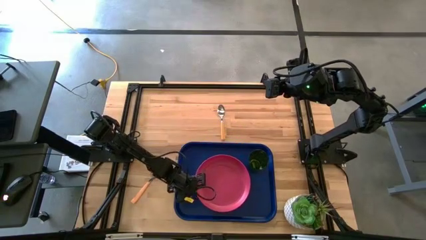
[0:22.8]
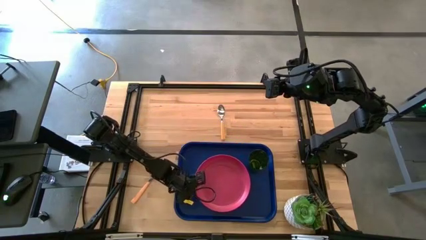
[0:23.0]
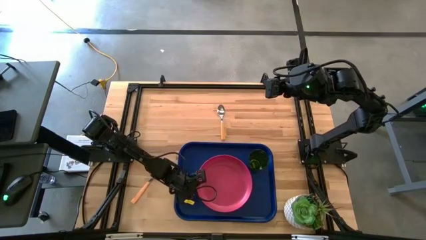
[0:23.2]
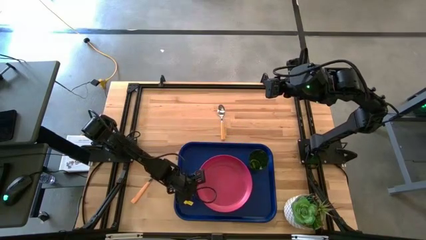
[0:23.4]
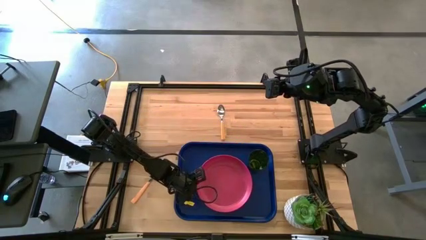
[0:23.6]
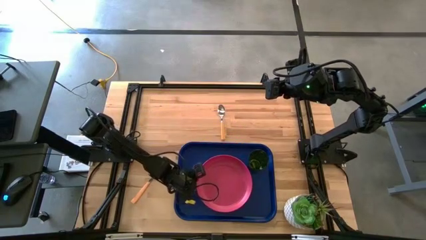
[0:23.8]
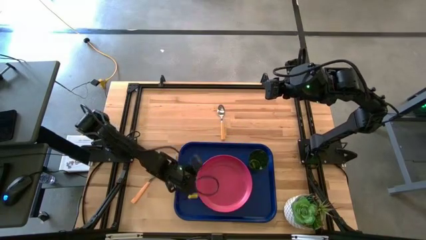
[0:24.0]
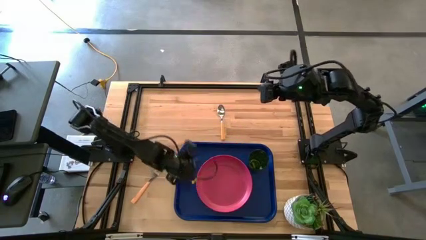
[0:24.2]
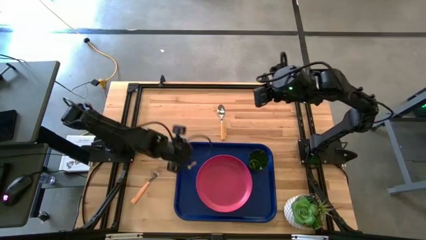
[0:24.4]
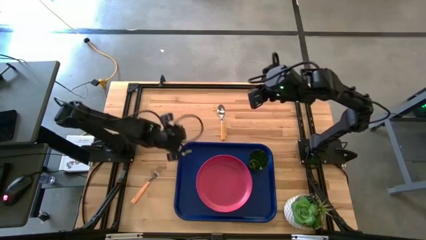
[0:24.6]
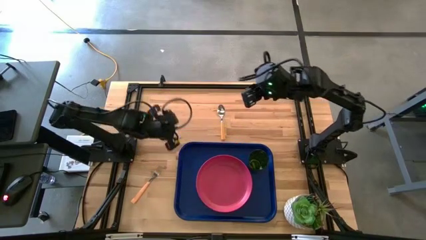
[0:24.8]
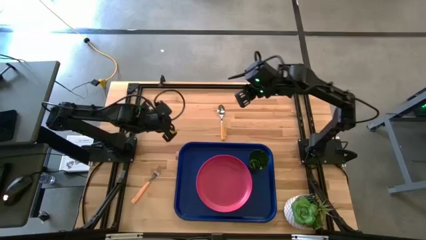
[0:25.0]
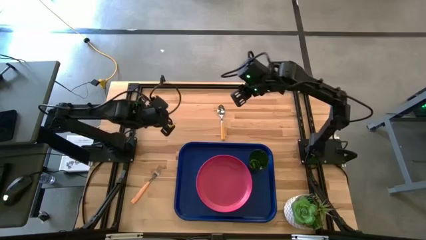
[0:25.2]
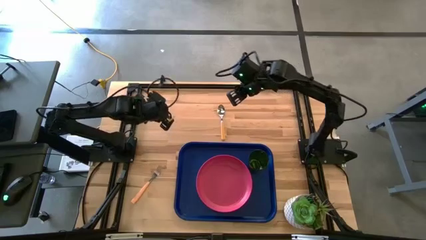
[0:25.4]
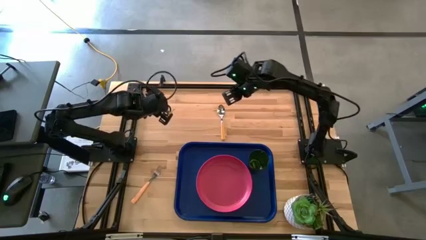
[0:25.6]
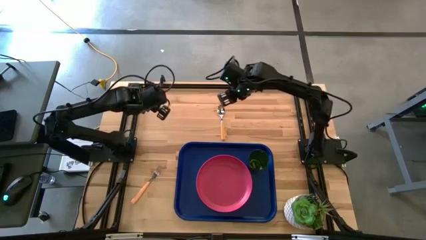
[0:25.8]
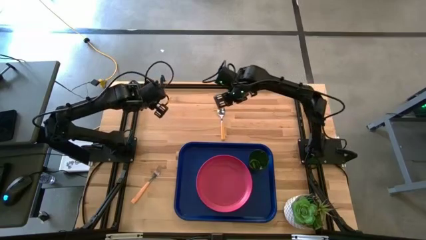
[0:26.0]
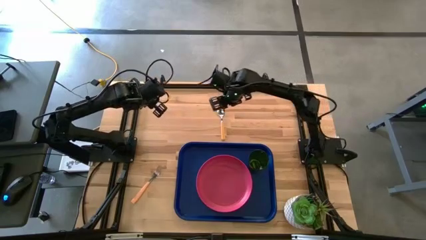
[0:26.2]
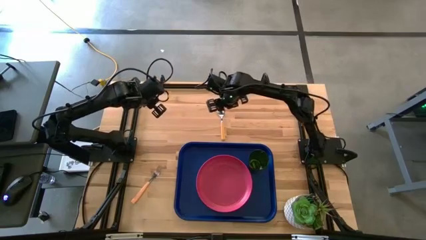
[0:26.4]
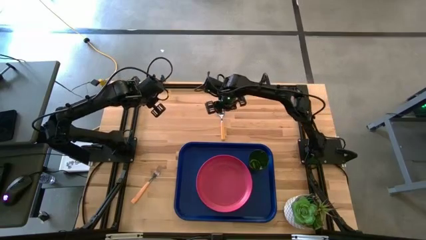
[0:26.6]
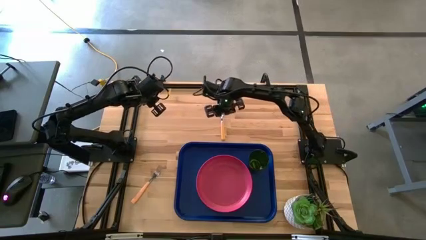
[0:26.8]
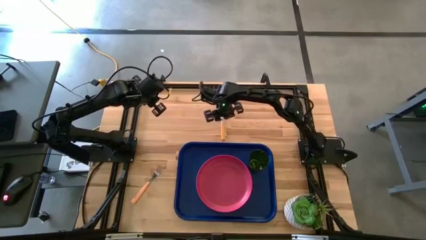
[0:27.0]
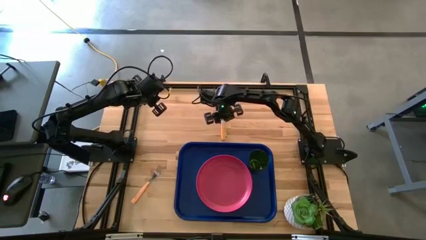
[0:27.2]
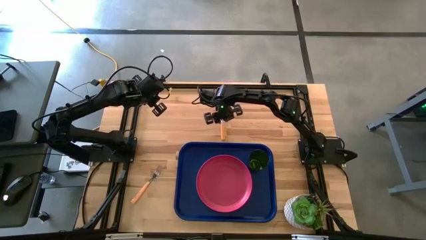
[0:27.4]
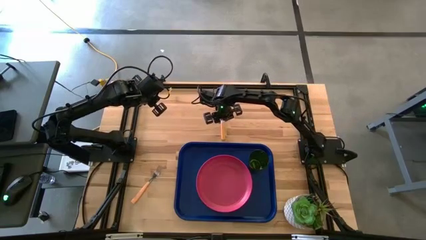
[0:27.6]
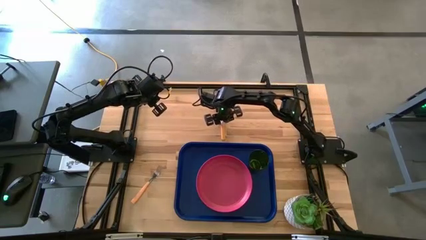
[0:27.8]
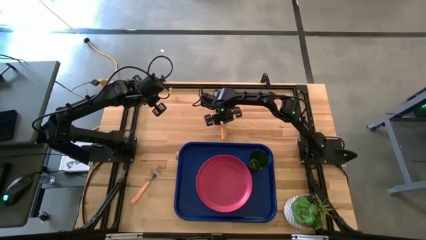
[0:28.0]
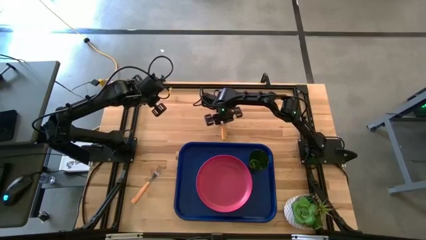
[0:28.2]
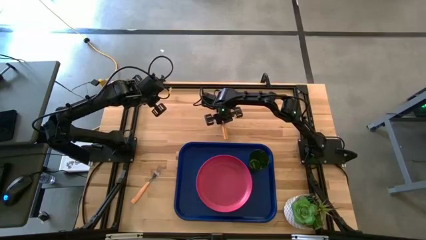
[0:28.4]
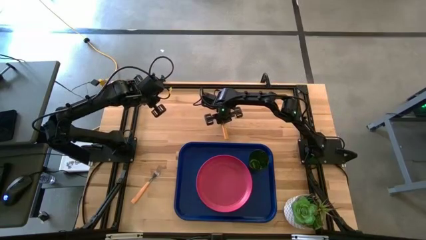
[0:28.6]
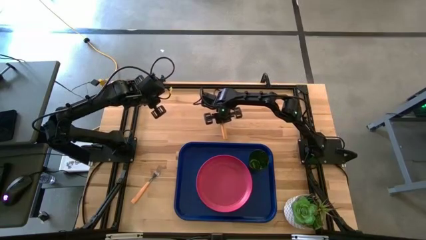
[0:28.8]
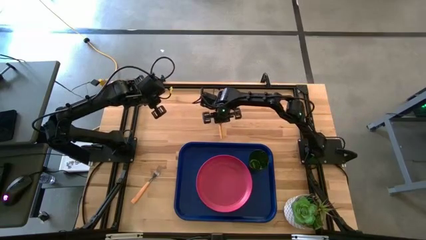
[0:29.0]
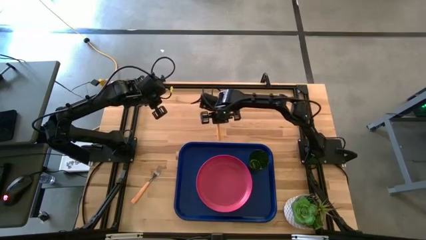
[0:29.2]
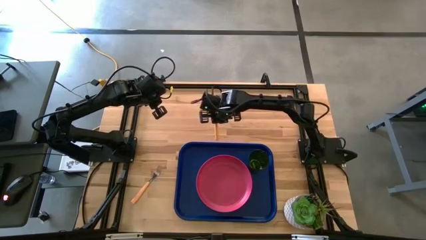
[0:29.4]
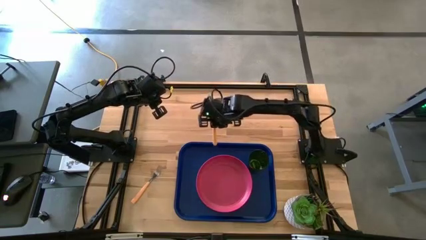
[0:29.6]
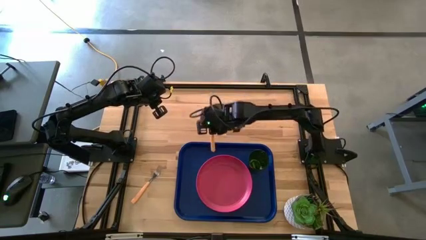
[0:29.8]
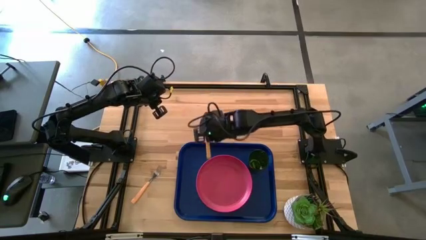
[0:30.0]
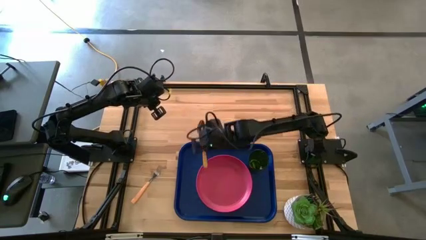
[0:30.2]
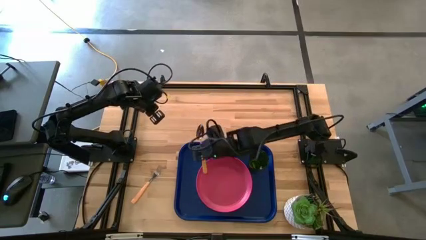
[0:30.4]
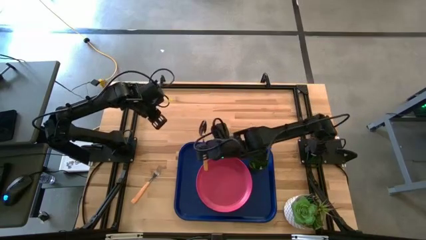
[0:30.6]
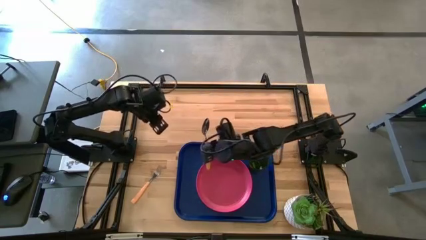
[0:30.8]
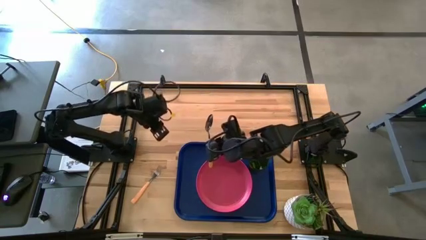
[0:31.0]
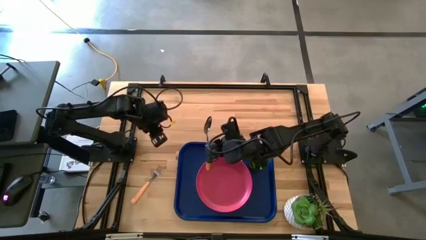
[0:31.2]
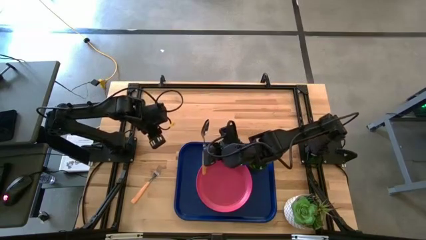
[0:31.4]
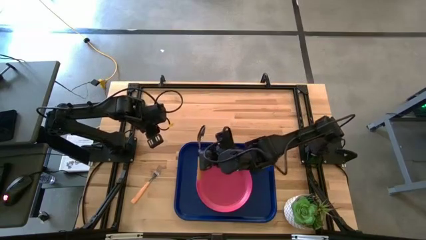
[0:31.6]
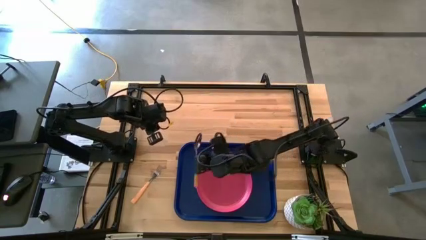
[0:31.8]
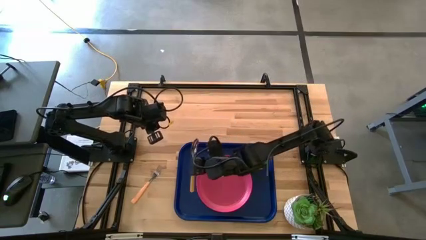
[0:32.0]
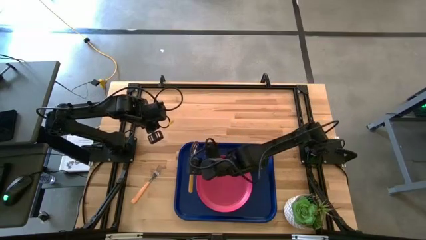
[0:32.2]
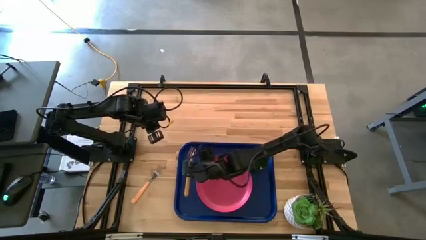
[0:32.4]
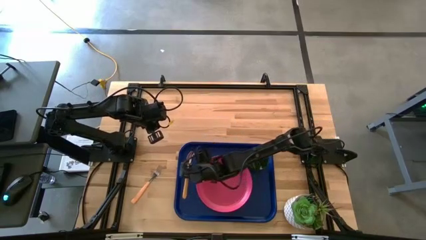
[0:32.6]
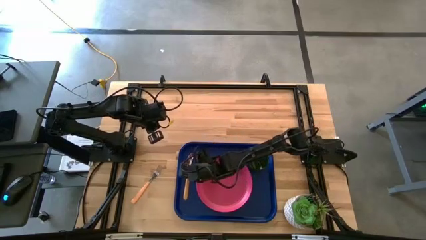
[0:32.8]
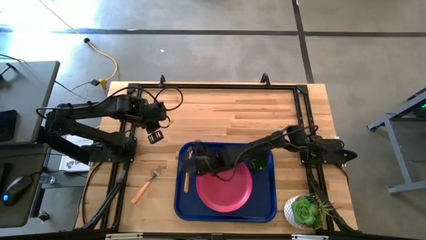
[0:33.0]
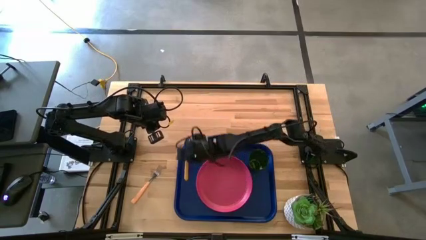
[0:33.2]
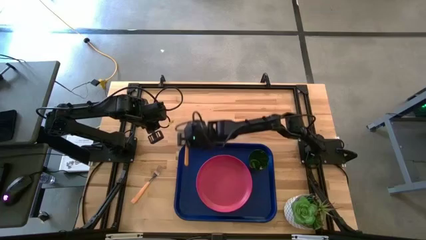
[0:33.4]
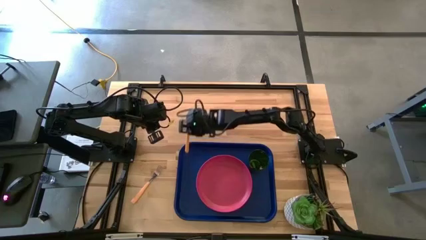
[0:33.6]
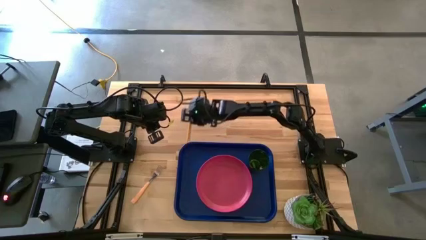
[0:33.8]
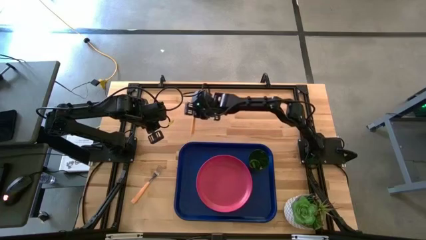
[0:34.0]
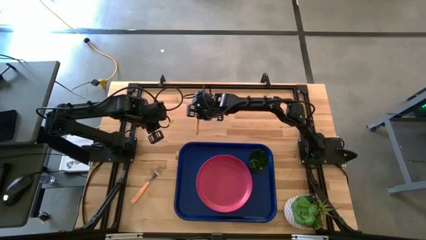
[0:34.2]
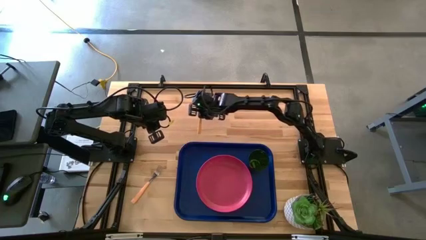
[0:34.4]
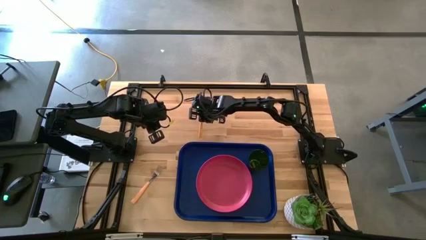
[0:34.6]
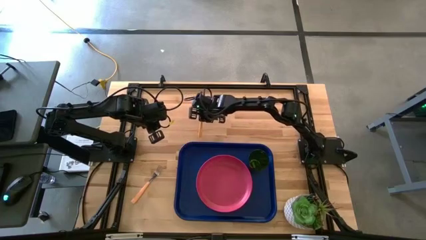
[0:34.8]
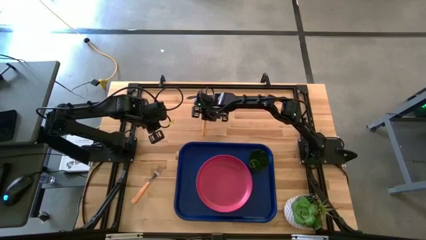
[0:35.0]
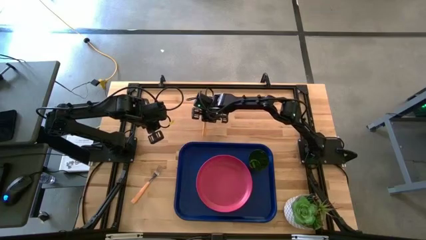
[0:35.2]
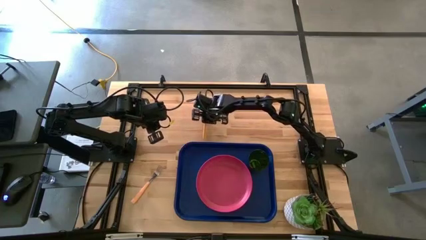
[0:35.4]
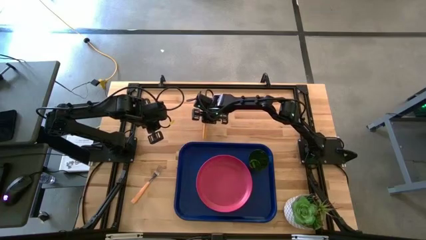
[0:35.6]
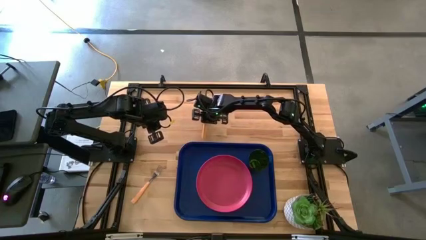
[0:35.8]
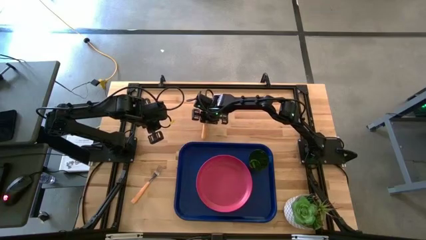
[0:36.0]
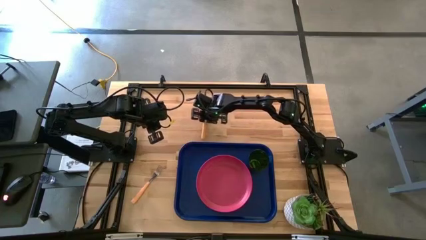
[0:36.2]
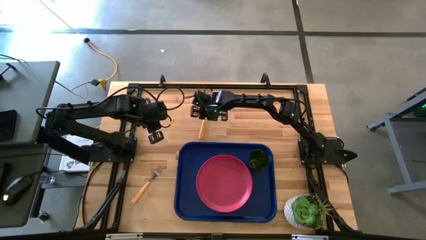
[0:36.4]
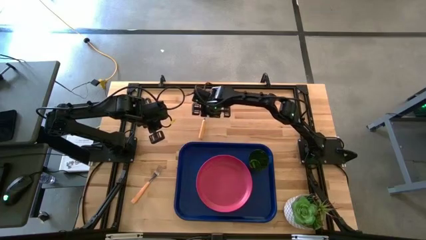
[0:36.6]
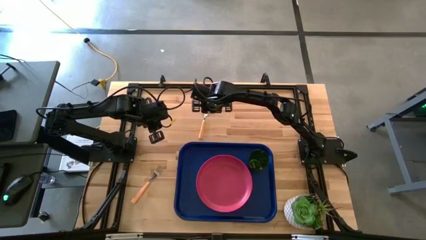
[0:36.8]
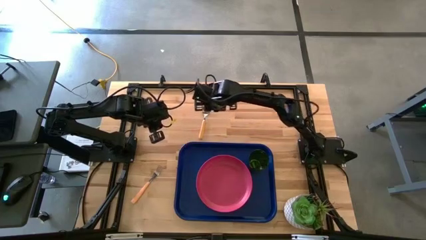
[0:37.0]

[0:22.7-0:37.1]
Task: Pick and place plate/cup/fork/spoon on tray
Put the yellow spoon on the blue tray to the left side of the pink plate

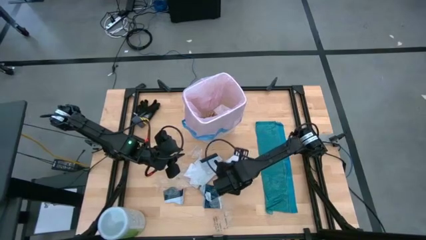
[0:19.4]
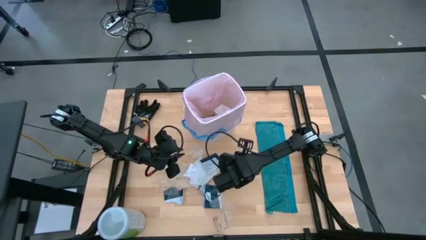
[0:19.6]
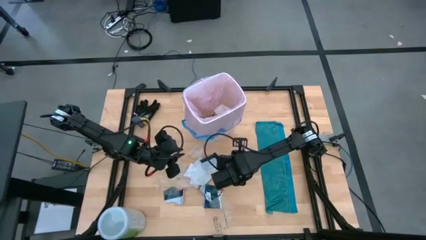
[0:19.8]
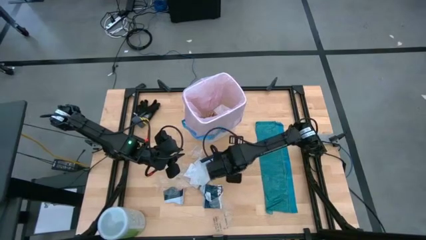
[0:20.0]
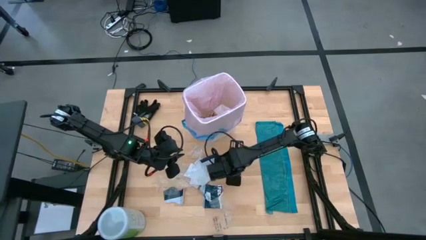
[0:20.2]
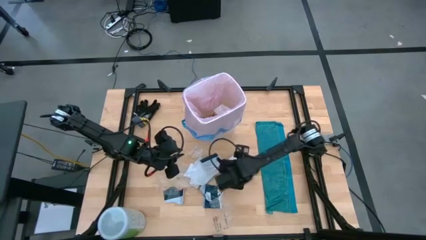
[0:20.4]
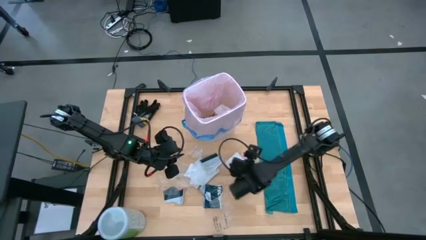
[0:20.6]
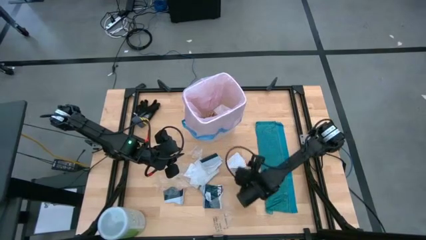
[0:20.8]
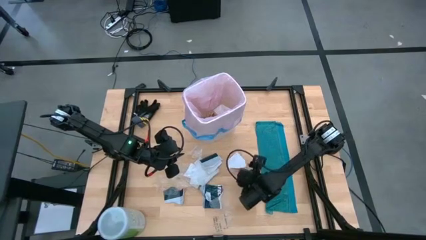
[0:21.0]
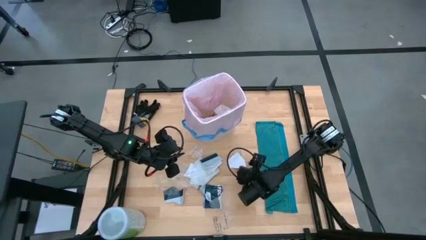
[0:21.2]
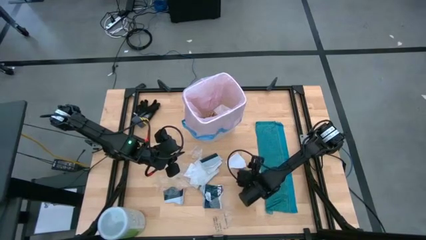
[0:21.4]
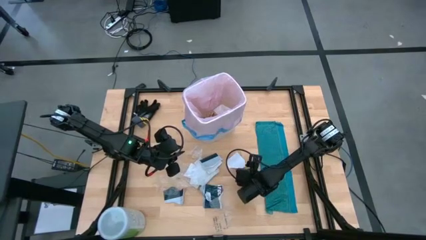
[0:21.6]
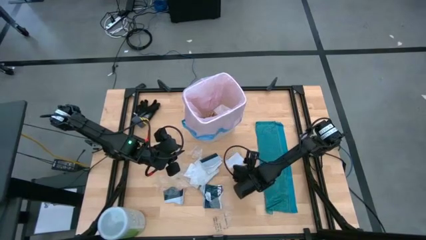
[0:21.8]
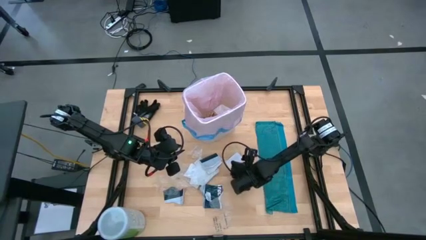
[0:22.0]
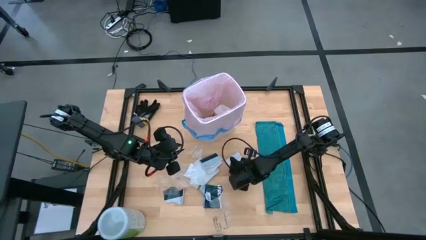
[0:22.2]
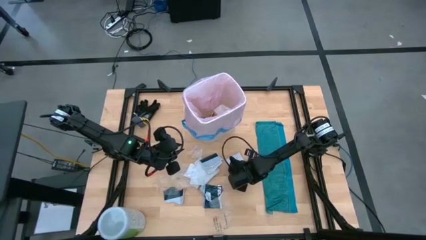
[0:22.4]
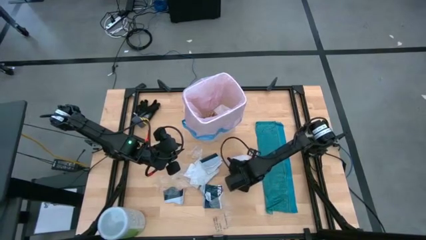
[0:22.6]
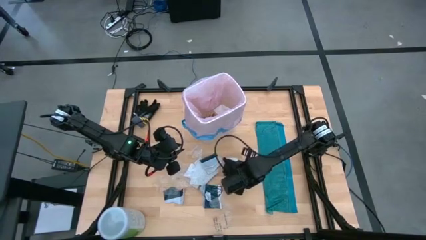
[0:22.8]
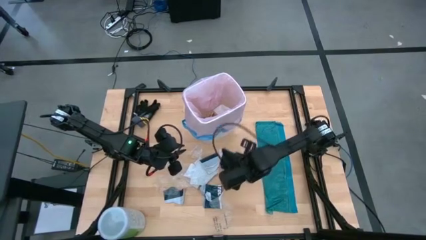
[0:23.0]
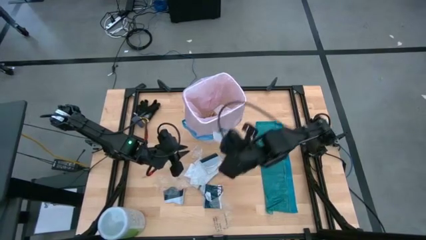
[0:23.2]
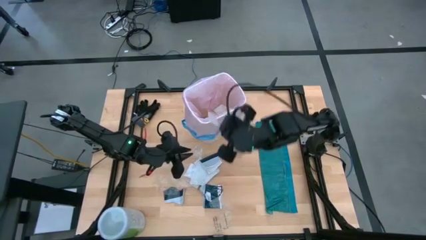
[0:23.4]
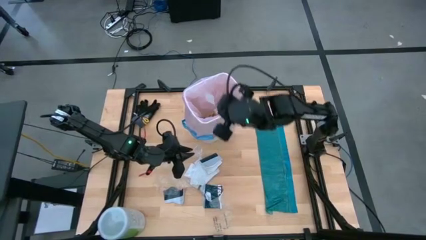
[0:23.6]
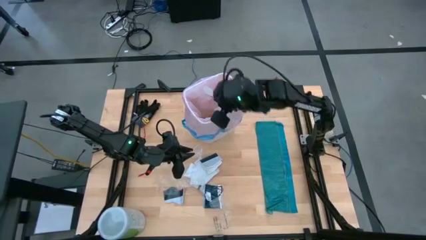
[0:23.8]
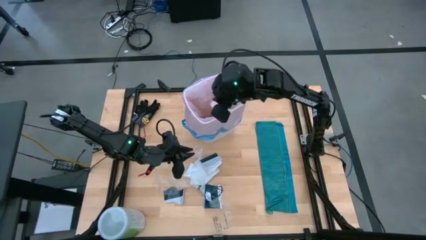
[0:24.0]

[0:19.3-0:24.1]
Task: place trash/remove bag and relplace
Put the paper trash into the white trash bin
